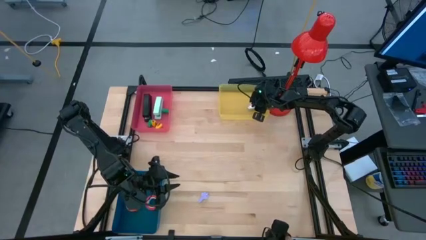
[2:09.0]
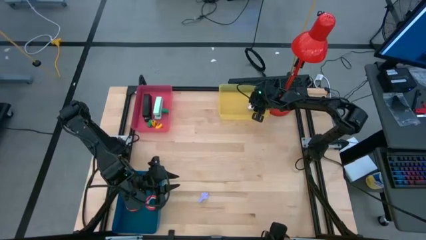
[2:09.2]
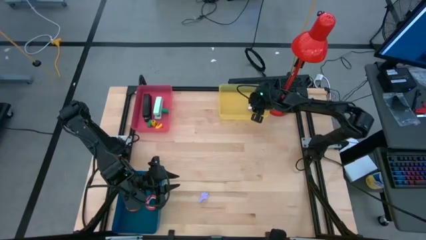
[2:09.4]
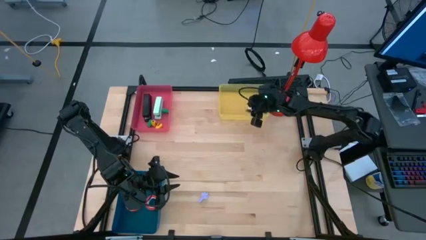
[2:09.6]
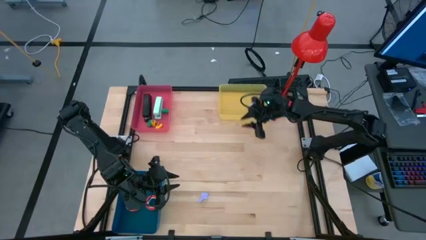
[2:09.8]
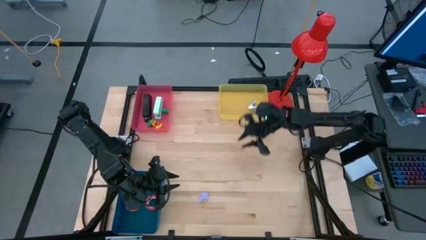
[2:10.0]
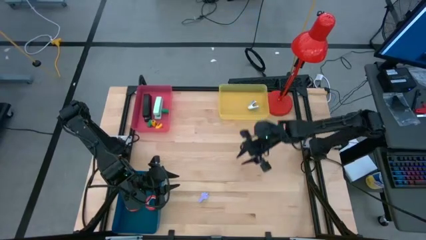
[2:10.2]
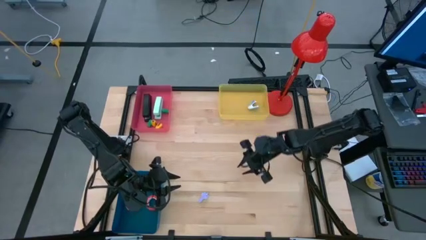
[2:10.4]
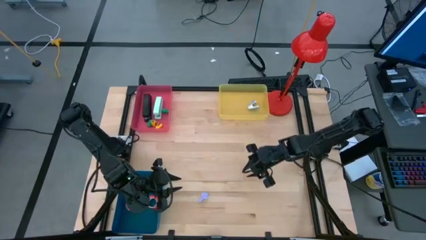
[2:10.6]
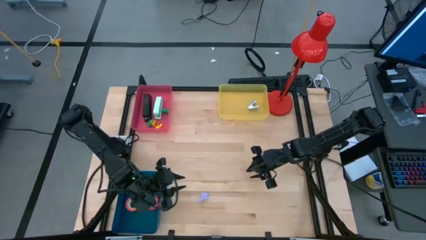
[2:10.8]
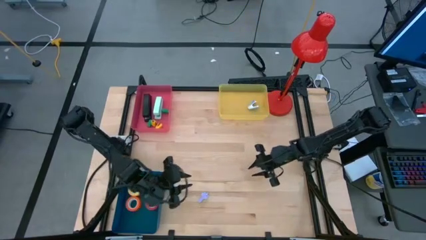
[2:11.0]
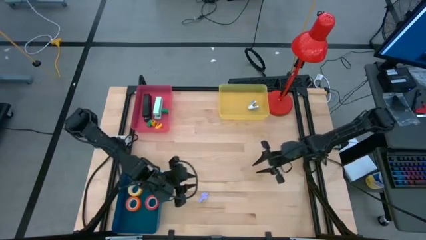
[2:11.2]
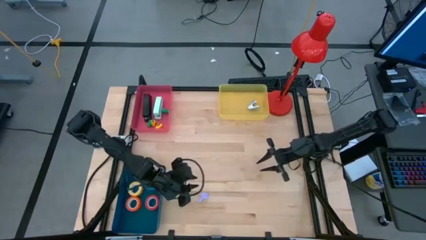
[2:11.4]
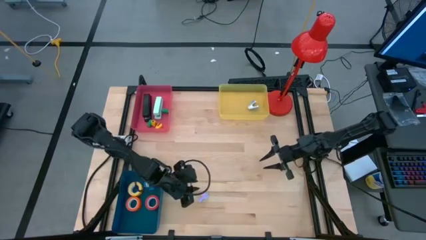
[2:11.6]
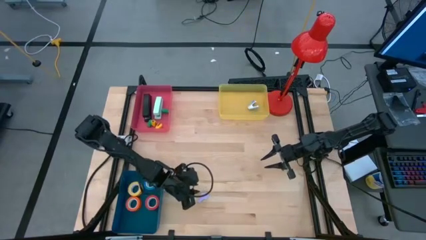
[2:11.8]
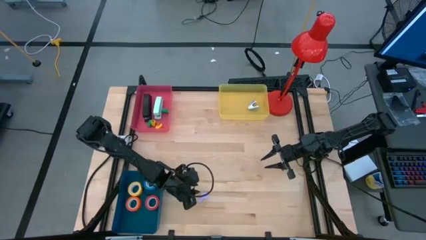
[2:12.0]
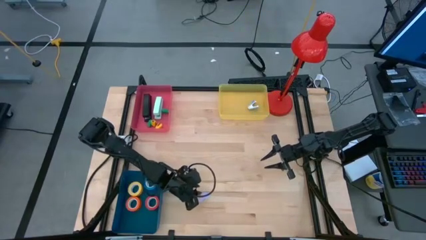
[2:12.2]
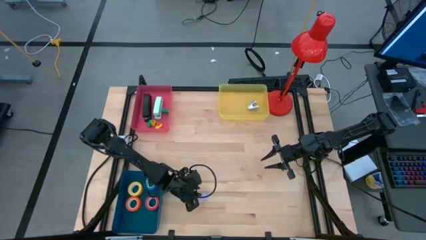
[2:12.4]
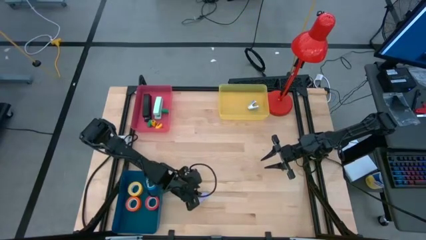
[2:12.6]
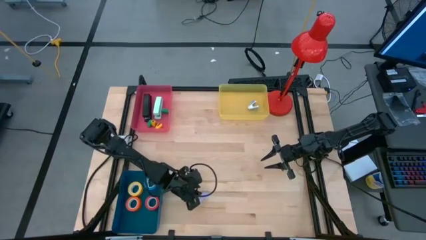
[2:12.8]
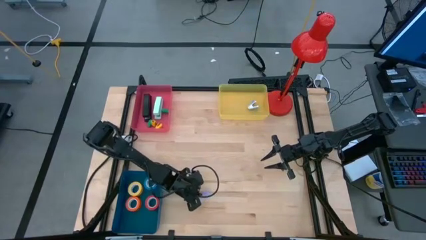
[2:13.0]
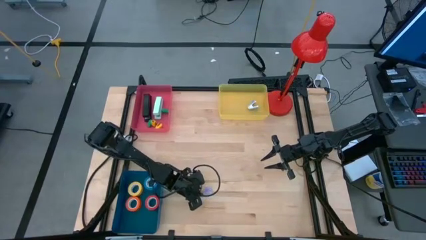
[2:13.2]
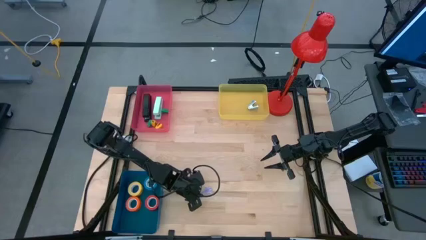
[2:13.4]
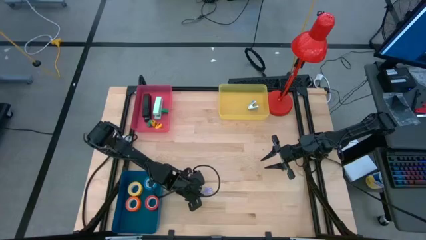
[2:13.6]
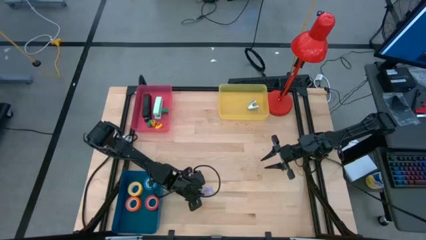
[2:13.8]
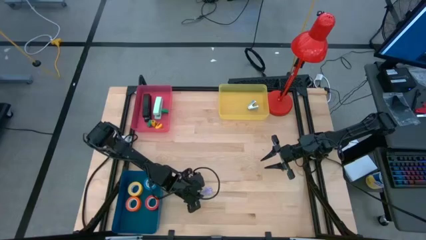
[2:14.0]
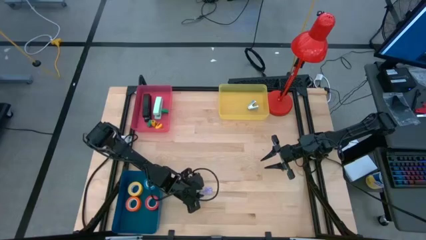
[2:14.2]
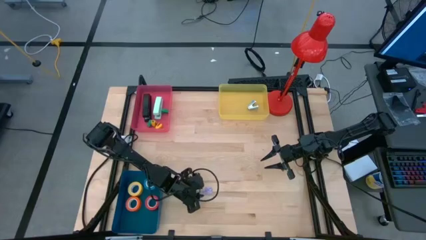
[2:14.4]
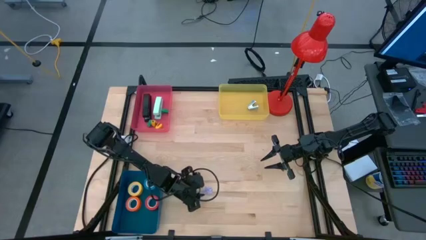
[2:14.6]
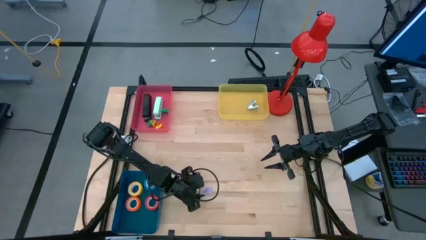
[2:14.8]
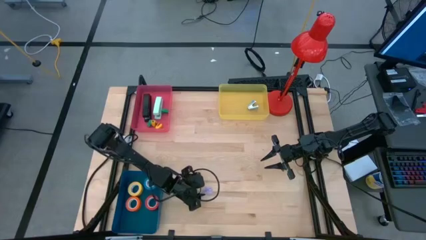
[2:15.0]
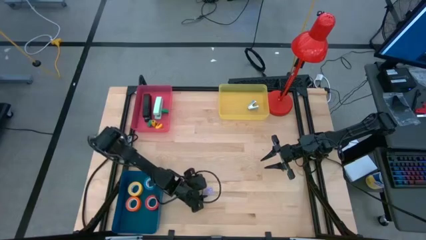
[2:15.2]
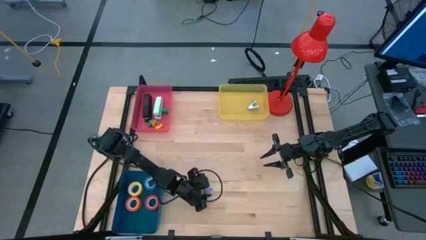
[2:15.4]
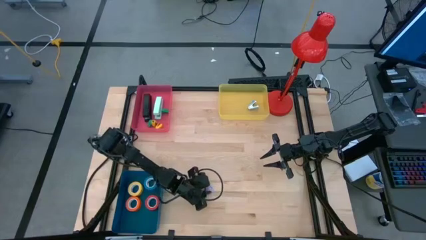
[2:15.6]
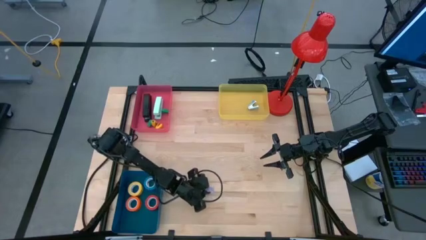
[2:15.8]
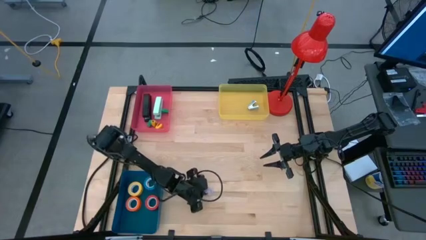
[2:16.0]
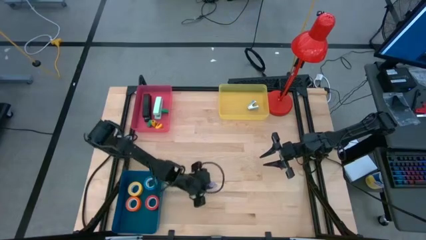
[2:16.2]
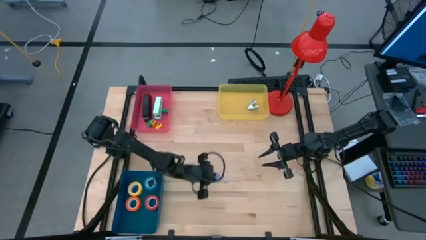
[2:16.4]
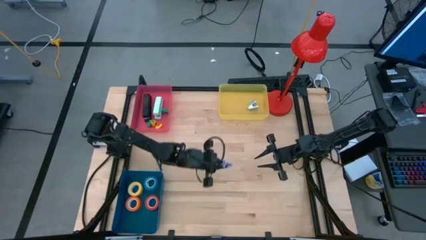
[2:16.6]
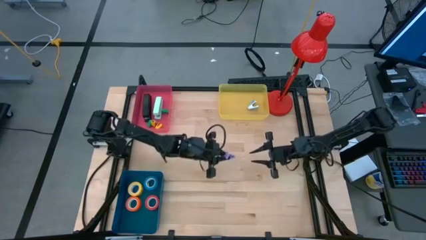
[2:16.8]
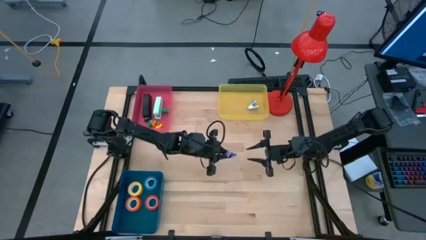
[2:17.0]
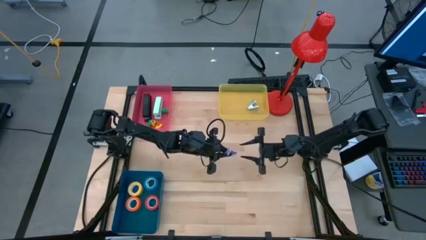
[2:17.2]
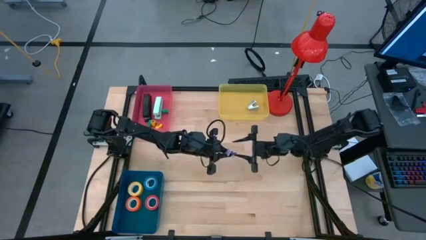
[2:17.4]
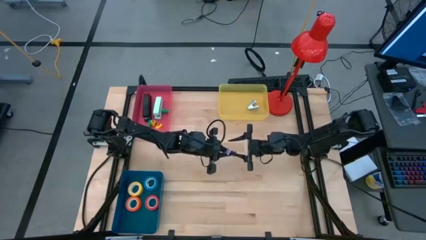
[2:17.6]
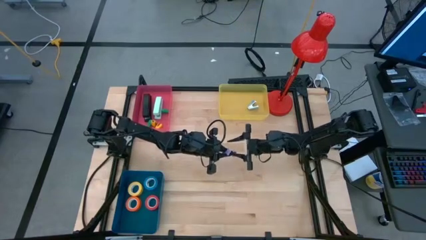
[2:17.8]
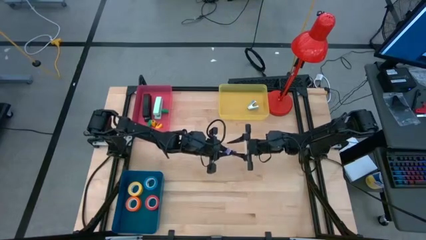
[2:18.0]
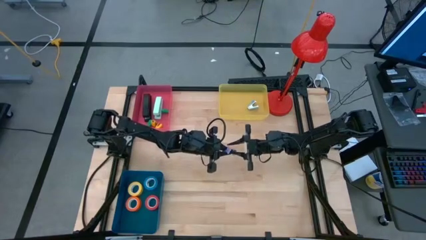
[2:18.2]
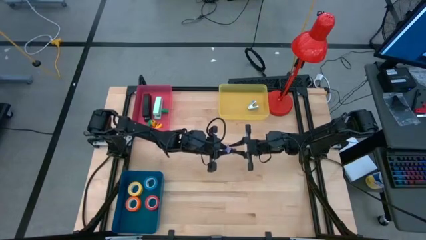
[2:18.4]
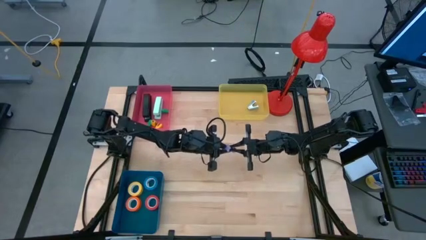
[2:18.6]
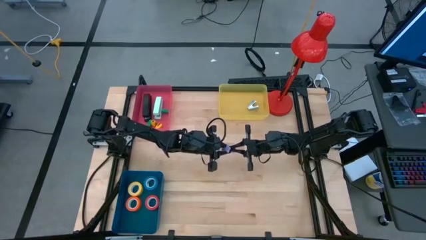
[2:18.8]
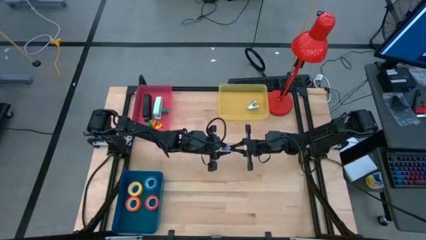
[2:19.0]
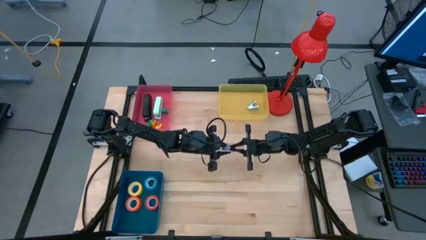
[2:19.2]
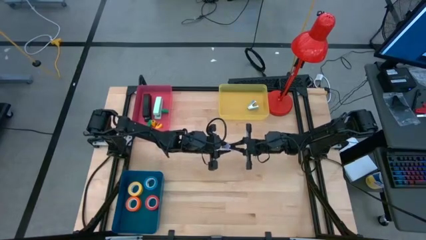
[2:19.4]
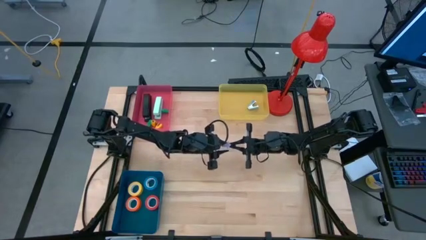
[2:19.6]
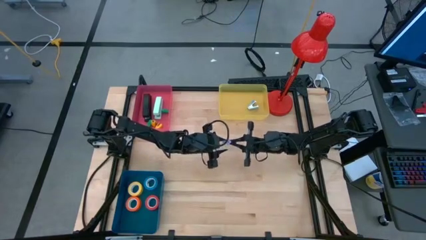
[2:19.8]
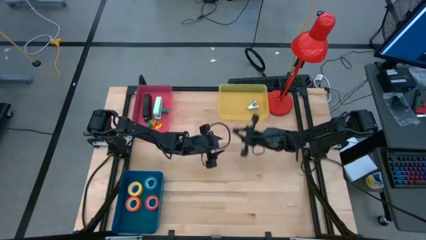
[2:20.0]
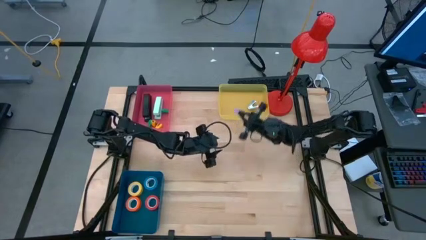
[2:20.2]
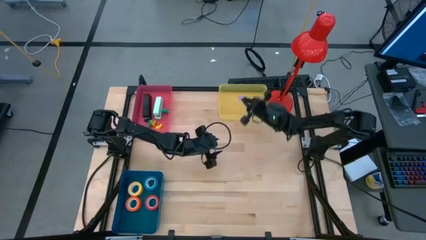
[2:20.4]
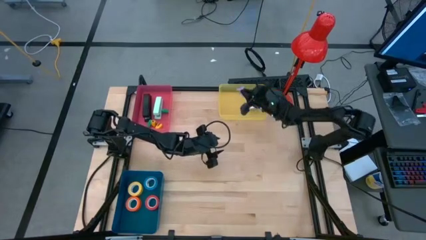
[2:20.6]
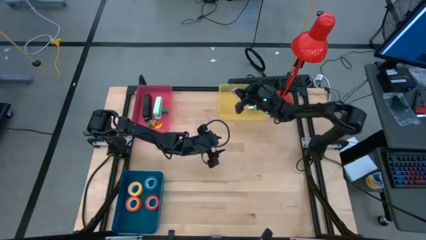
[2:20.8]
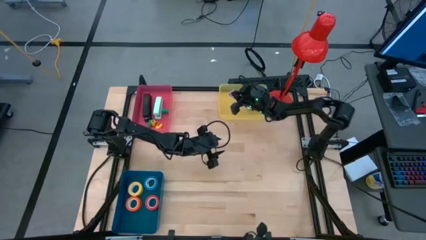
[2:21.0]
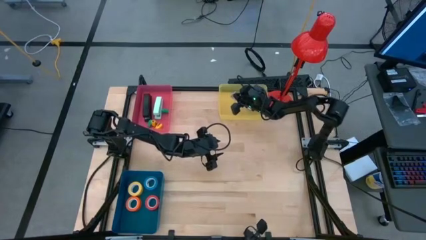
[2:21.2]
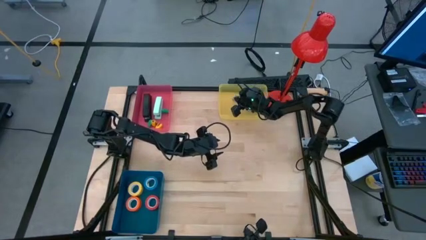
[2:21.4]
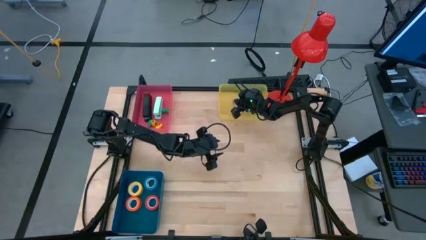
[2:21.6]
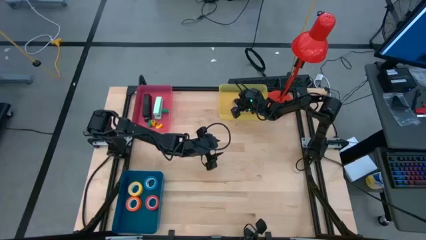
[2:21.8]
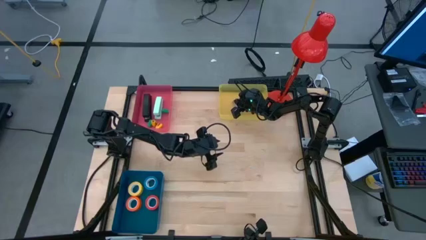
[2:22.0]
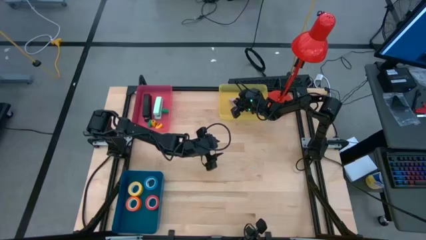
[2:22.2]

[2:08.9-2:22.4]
Task: Pick and place Stapler, Stapler remover, tape
Put the purple staple remover into the yellow bin
